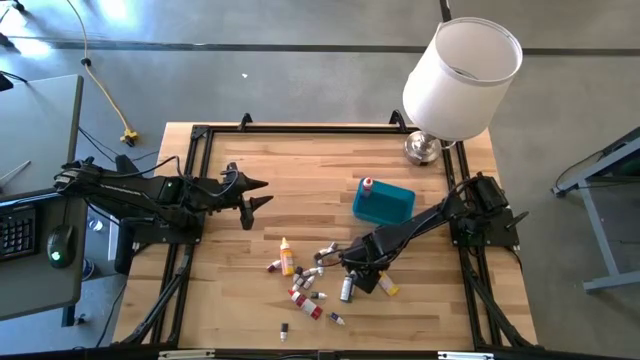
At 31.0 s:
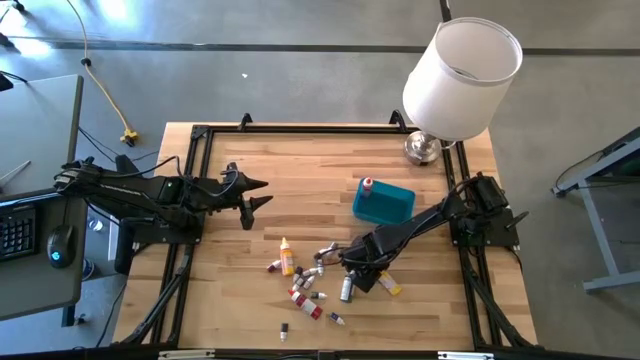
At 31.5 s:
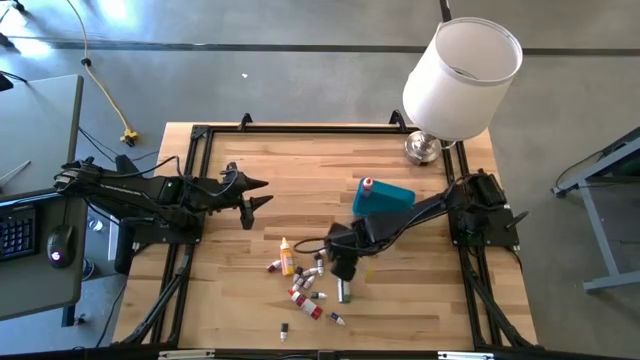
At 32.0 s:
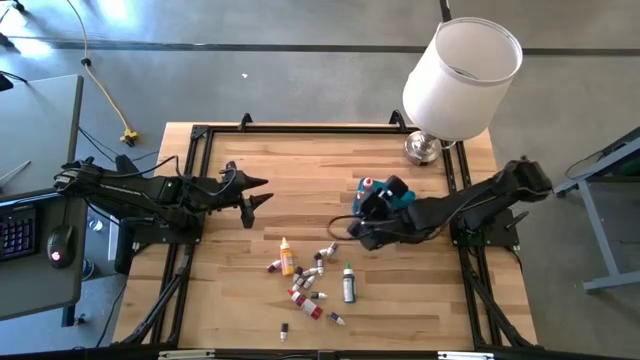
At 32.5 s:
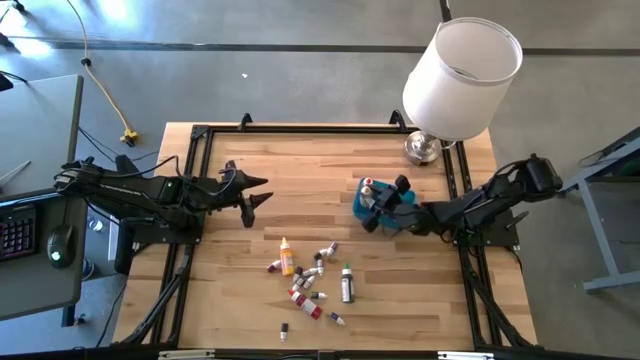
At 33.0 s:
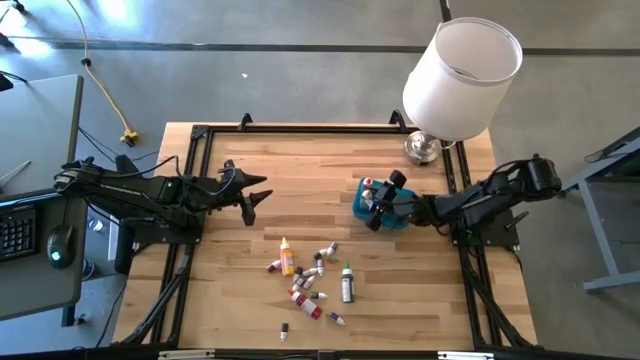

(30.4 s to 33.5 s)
Task: Pick & Place food coloring
Put the right large yellow food coloring bottle into the blue bin

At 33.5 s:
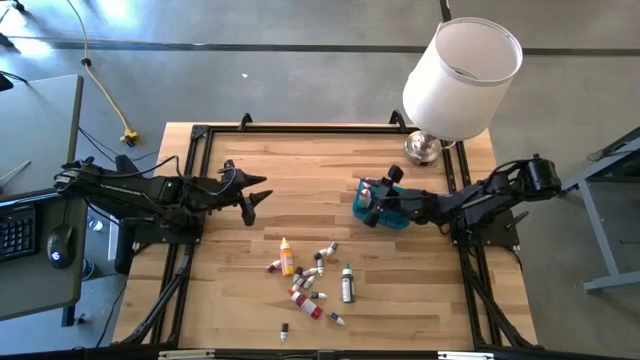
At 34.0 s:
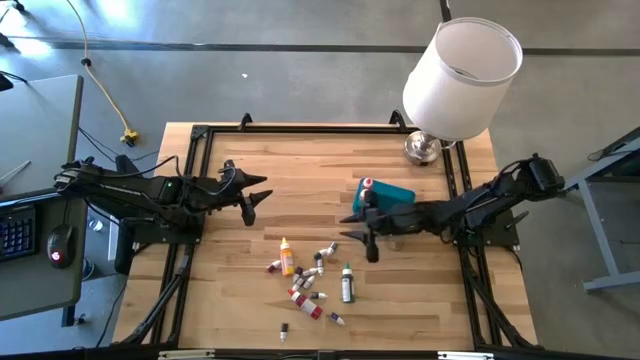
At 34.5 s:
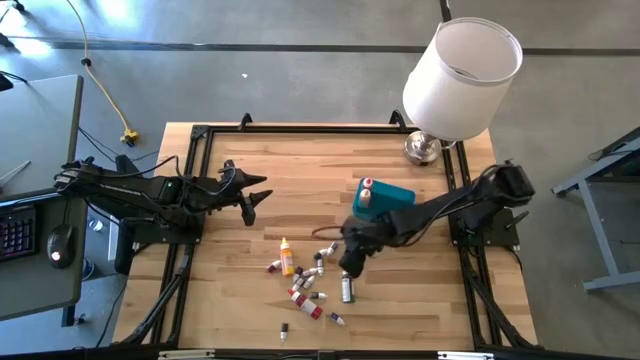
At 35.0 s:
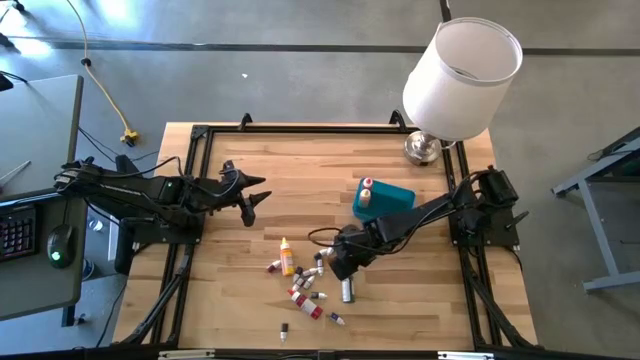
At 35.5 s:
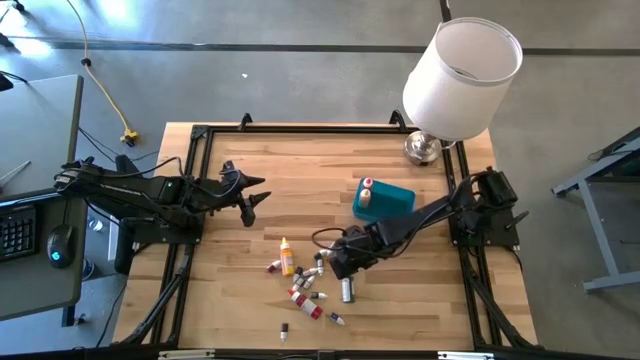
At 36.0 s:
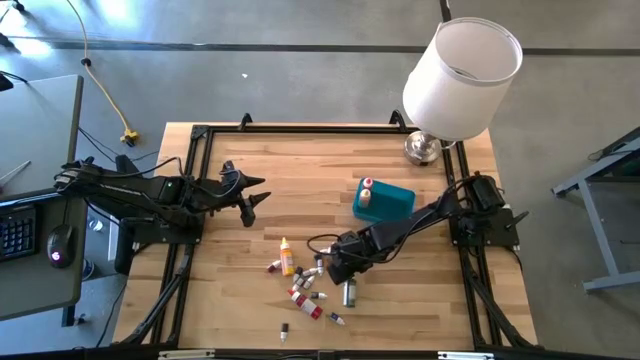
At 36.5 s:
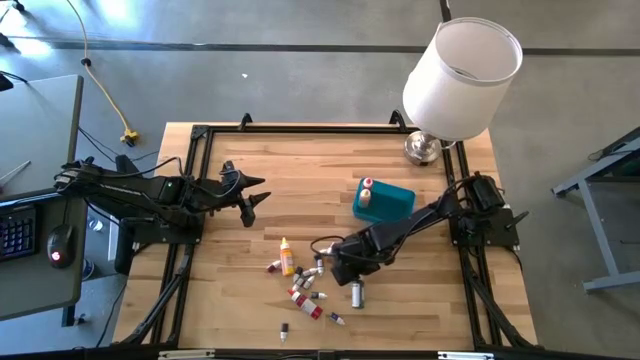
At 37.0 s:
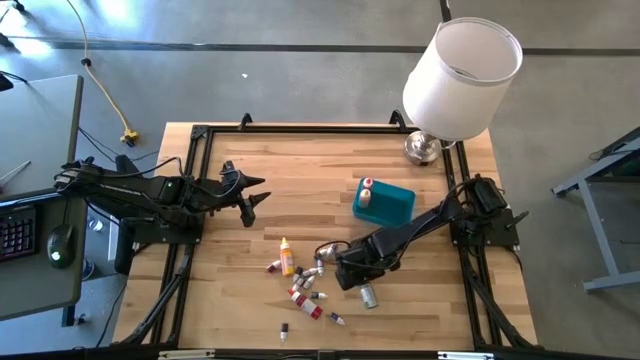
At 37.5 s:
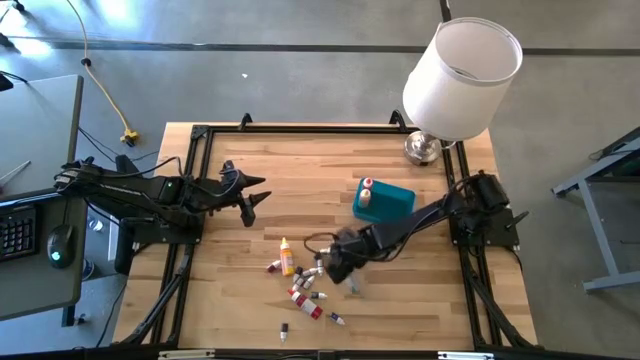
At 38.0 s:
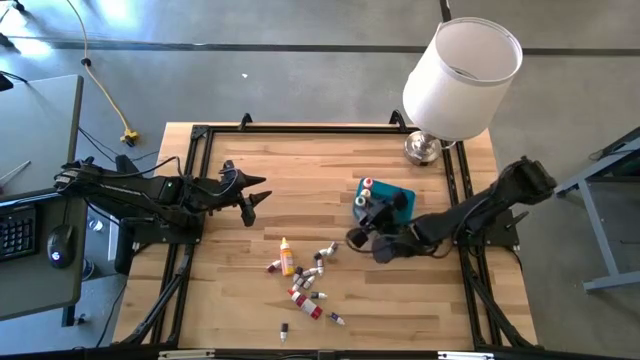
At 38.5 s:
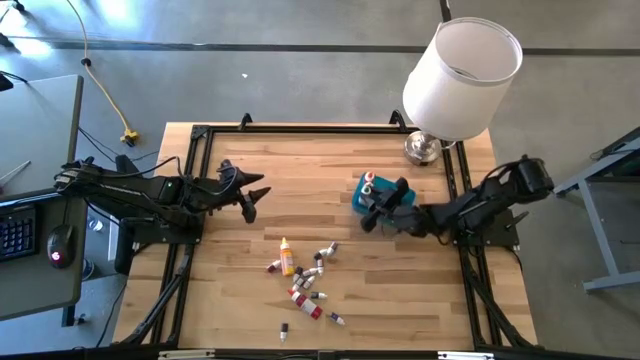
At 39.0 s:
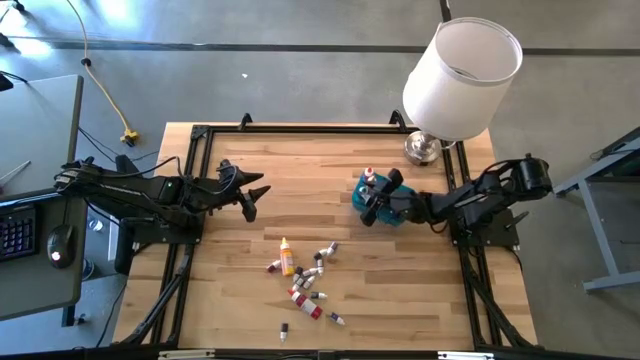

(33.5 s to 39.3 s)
Put the large green food coloring bottle into the blue bin

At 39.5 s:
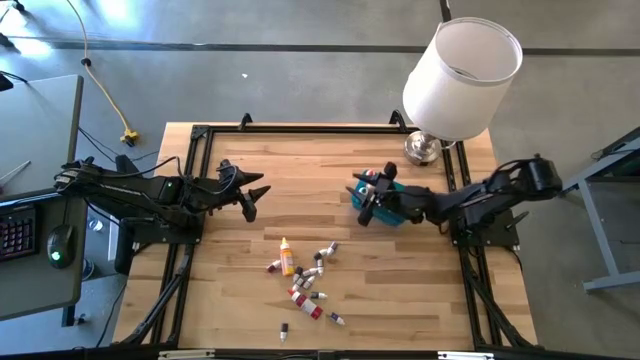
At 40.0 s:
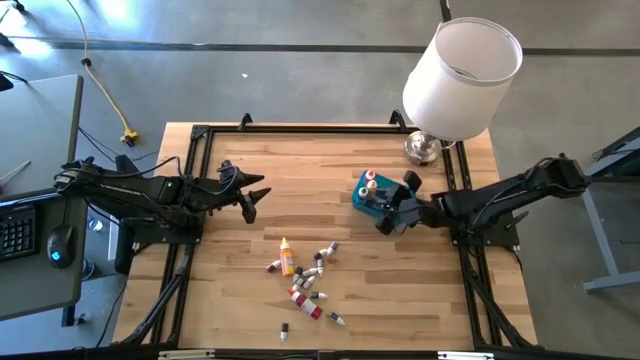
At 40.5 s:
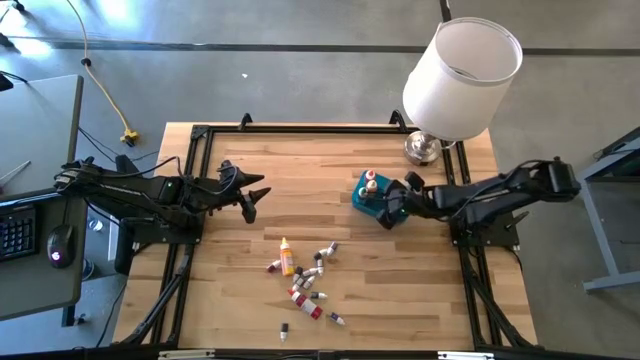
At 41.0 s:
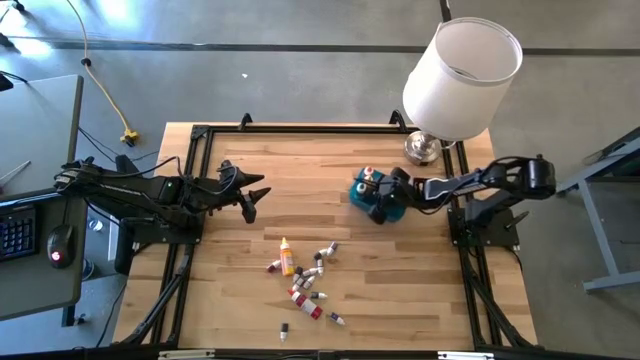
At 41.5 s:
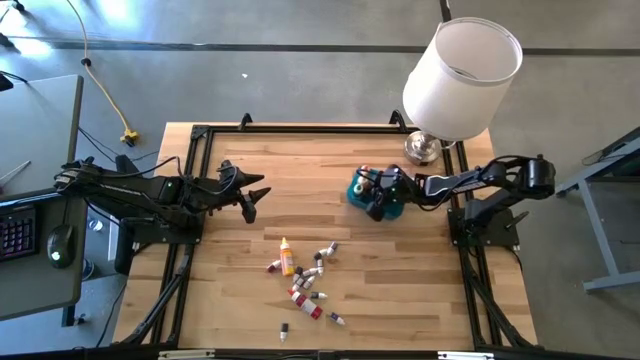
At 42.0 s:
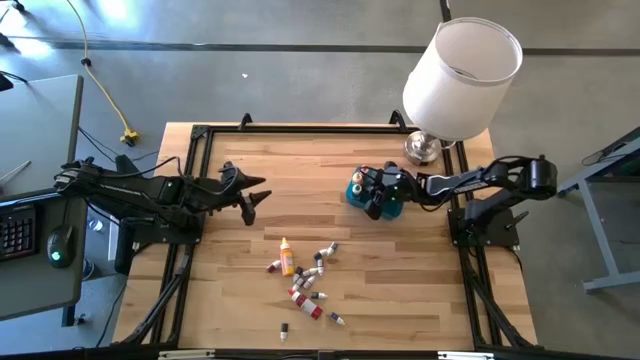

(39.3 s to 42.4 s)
Adjust the large yellow food coloring bottle into the blue bin

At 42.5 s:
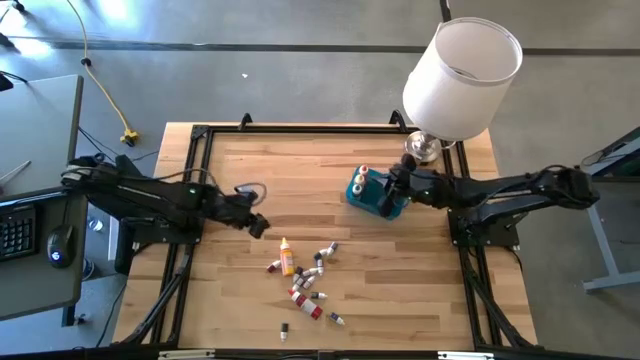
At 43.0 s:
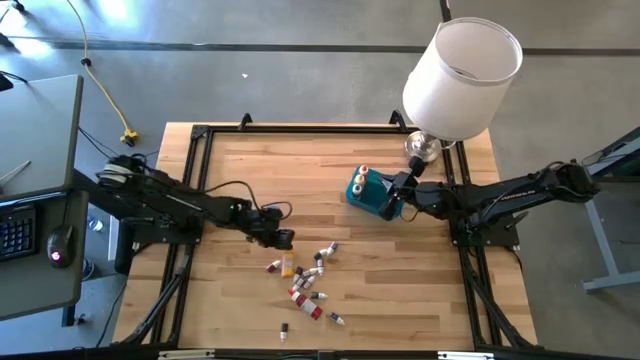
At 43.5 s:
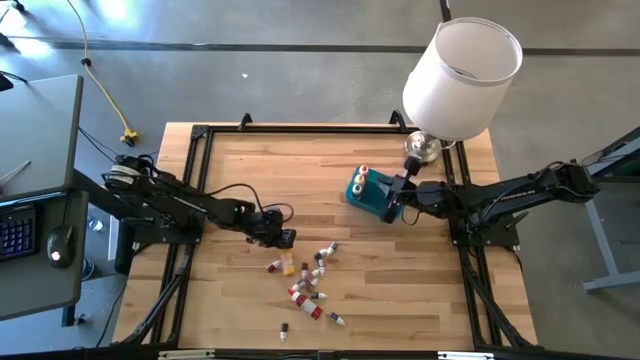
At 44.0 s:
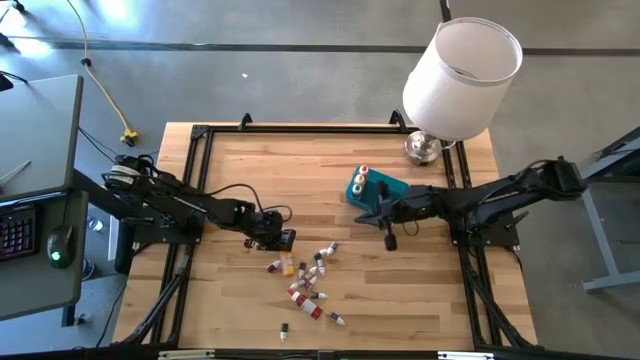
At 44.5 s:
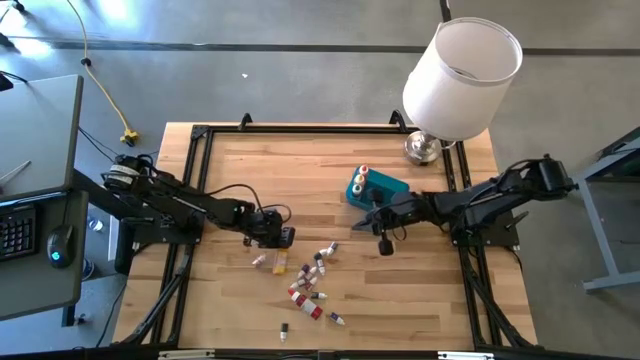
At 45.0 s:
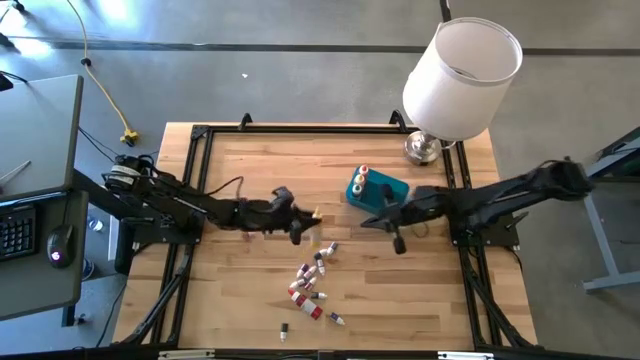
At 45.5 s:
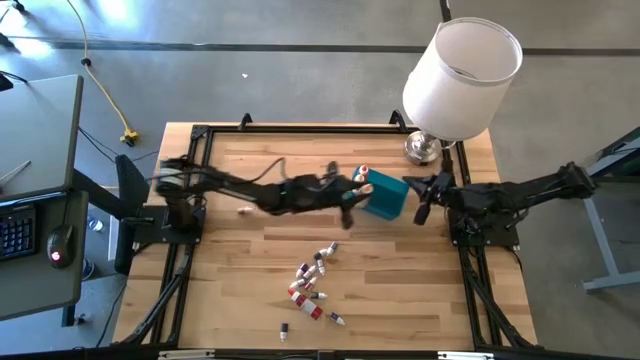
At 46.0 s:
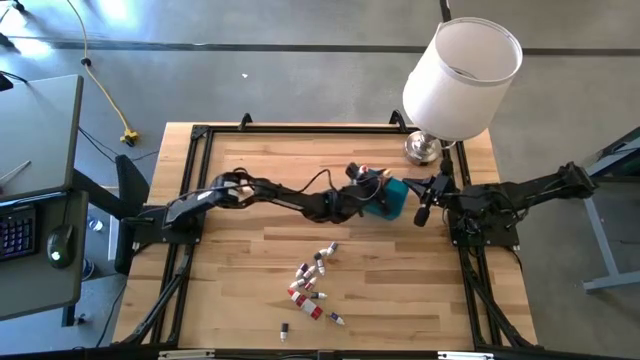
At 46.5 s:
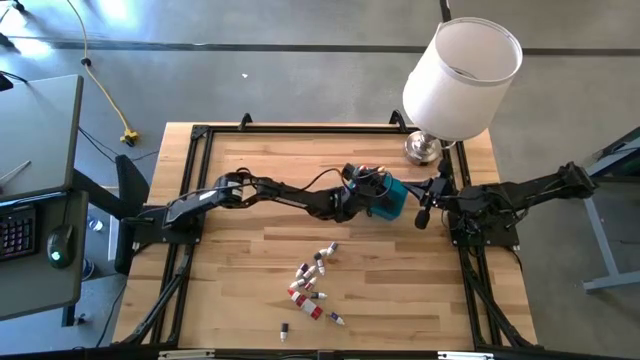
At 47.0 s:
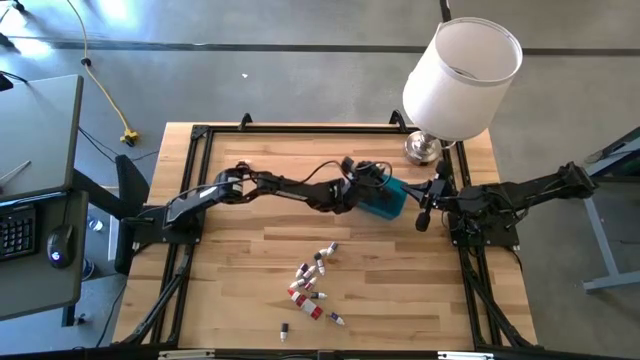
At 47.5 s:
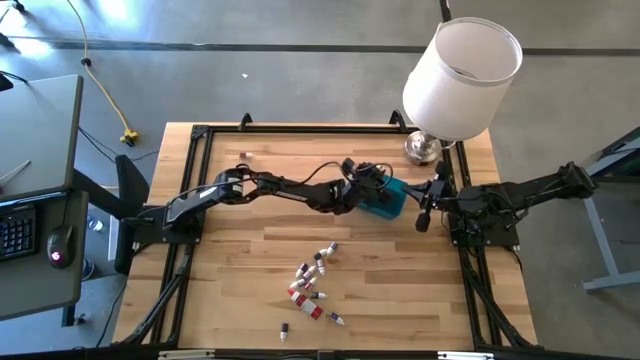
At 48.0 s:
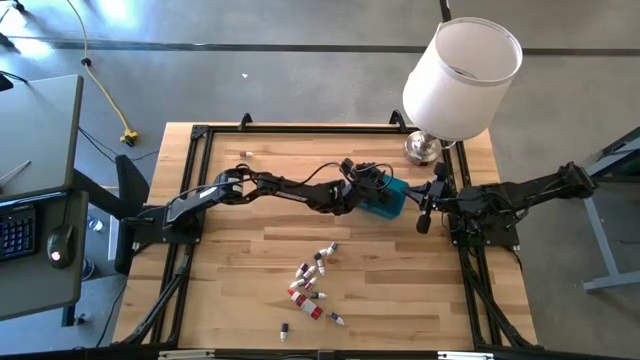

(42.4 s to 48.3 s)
Put the large yellow food coloring bottle into the blue bin

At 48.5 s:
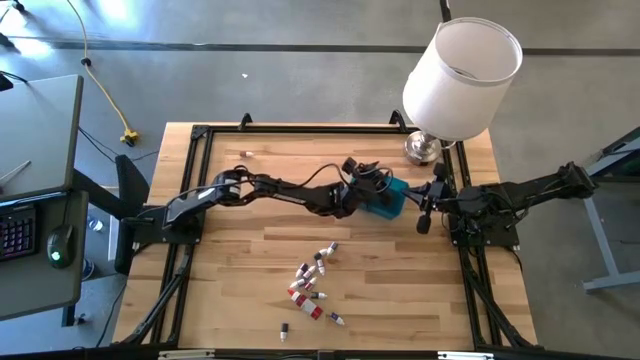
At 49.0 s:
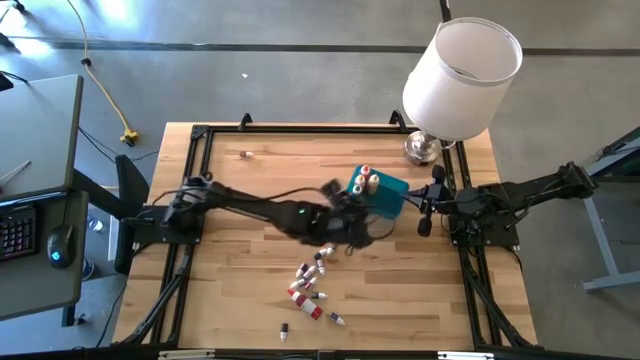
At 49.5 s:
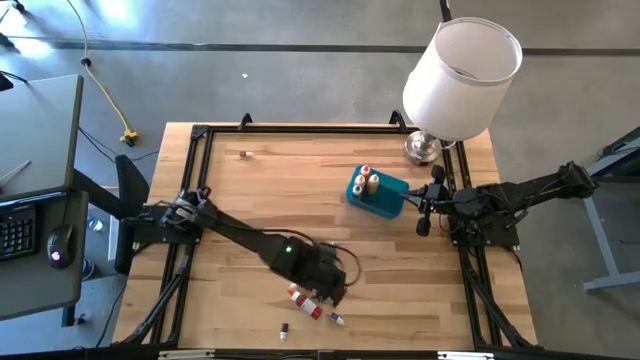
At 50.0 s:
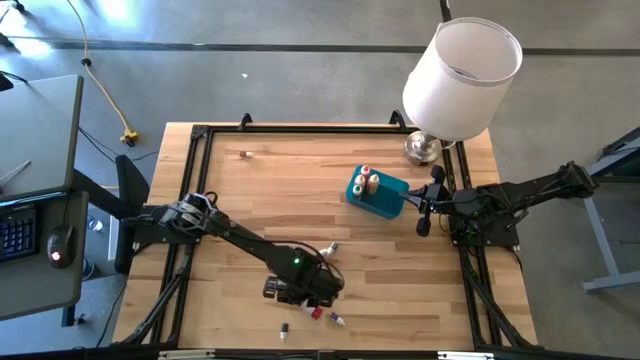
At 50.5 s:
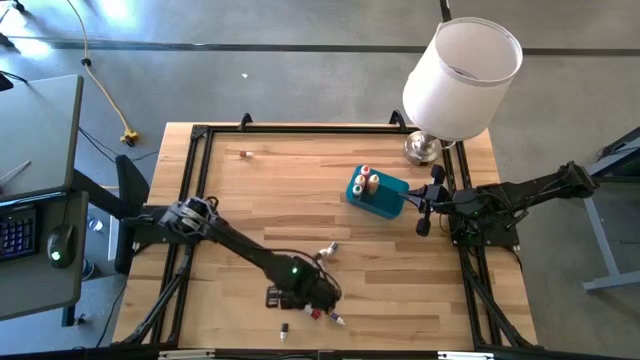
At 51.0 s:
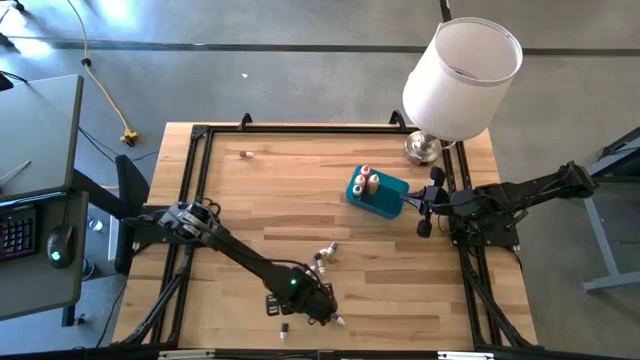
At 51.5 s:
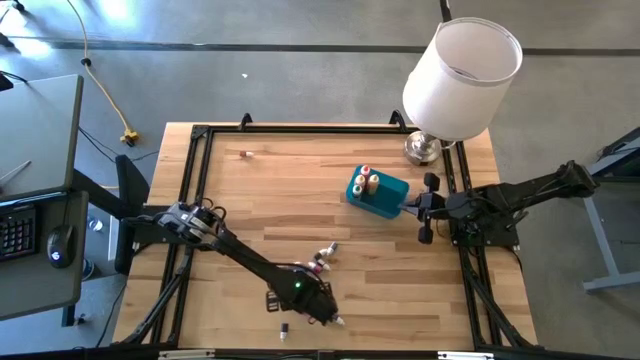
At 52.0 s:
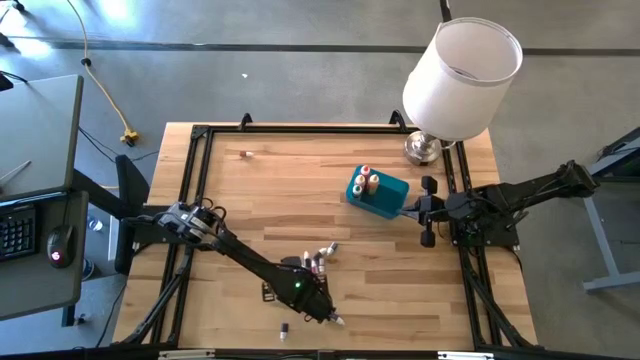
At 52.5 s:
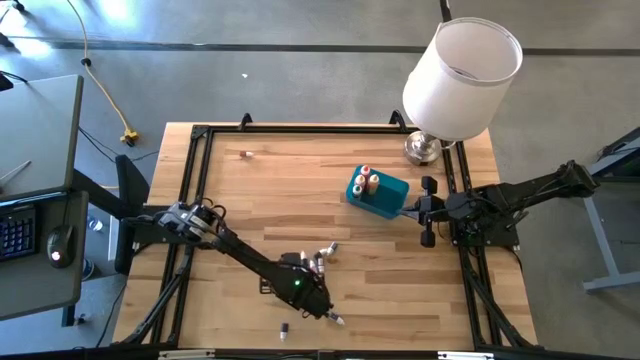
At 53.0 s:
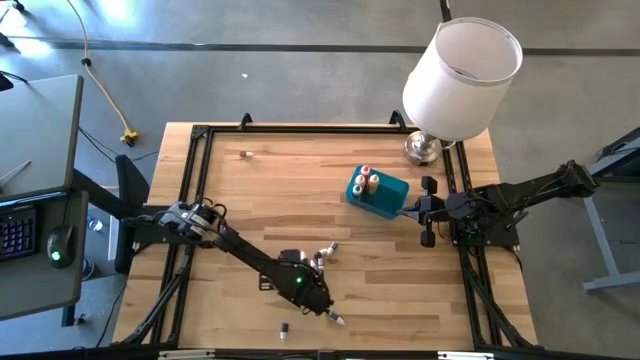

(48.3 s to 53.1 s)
Put the large red food coloring bottle into the blue bin
